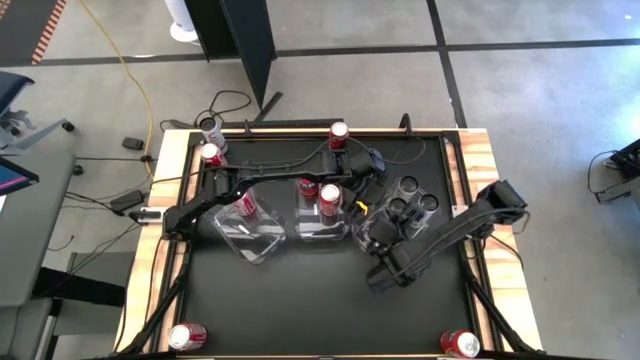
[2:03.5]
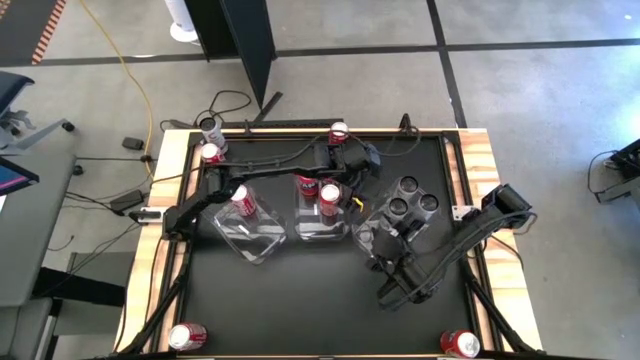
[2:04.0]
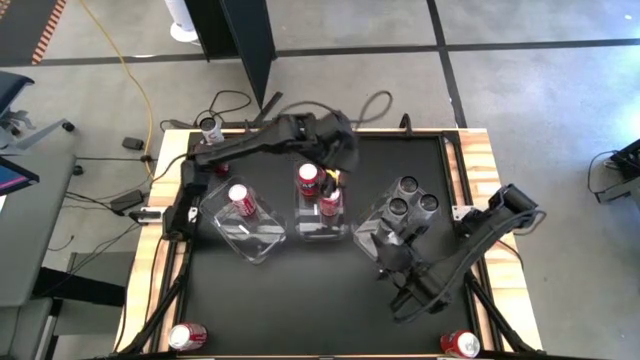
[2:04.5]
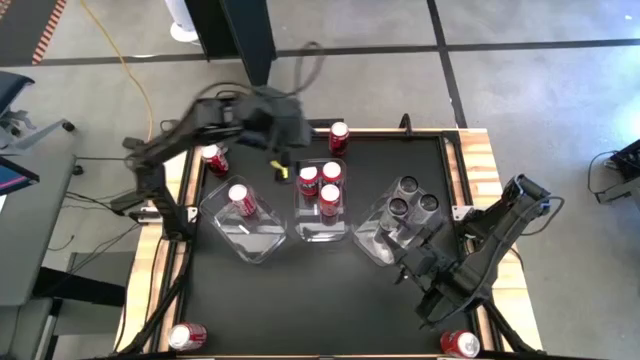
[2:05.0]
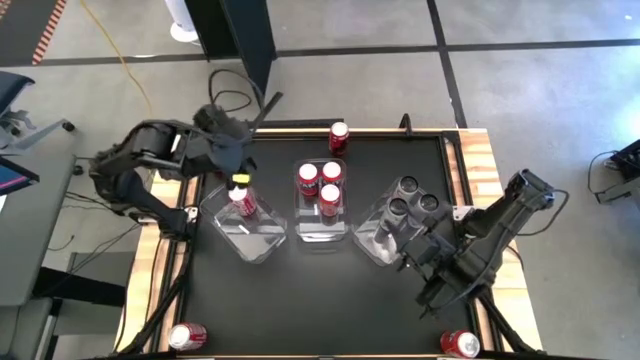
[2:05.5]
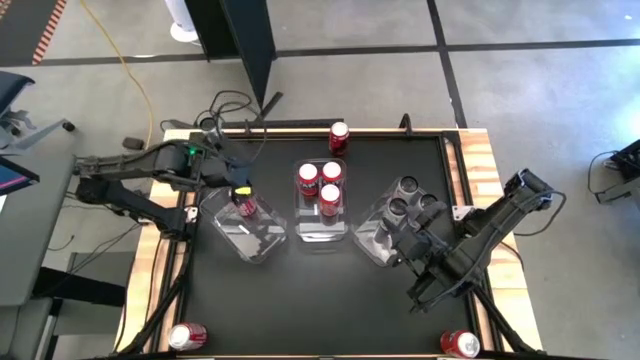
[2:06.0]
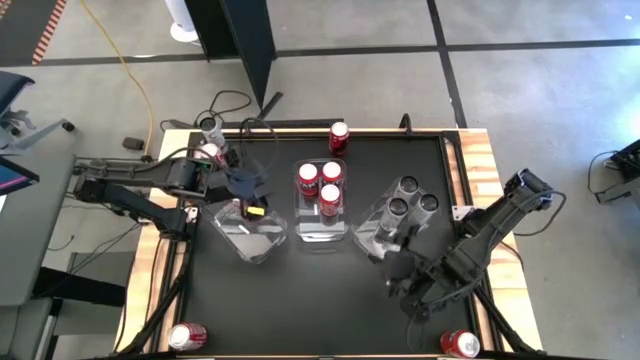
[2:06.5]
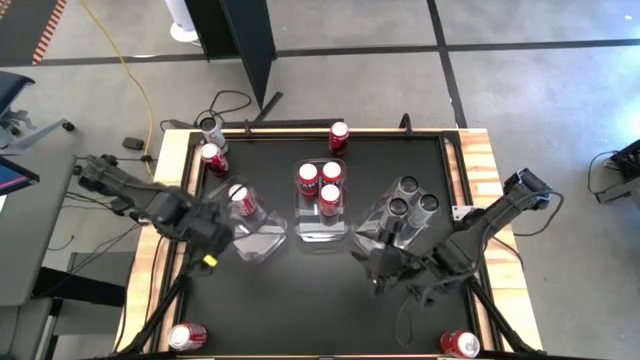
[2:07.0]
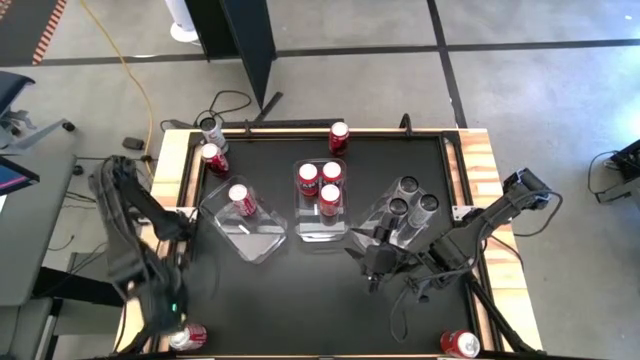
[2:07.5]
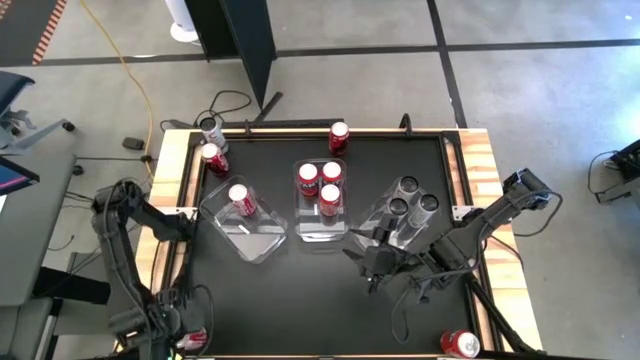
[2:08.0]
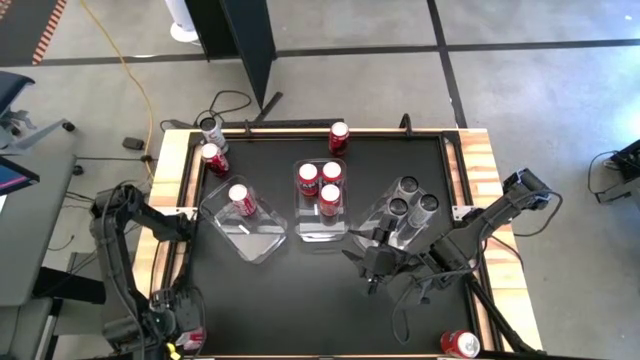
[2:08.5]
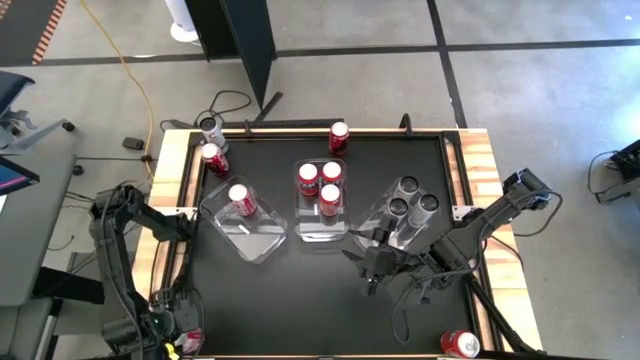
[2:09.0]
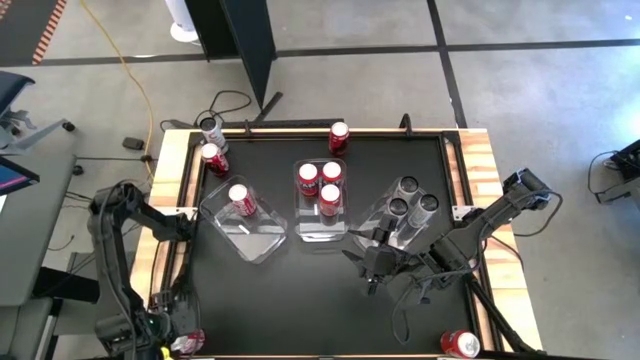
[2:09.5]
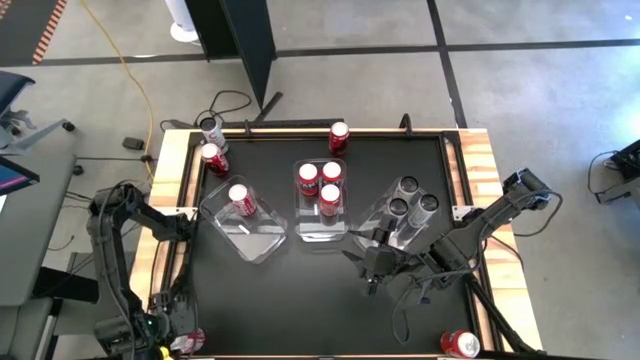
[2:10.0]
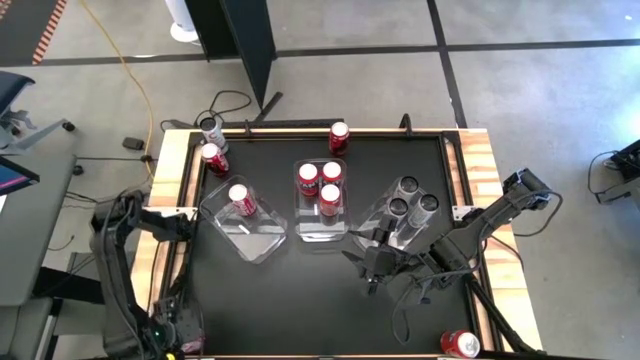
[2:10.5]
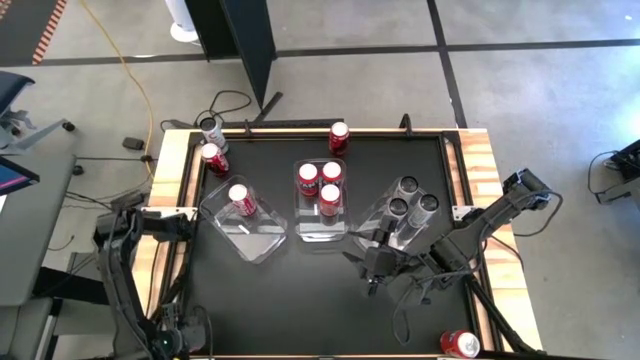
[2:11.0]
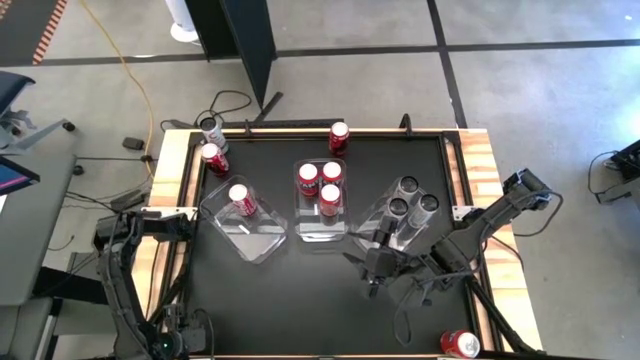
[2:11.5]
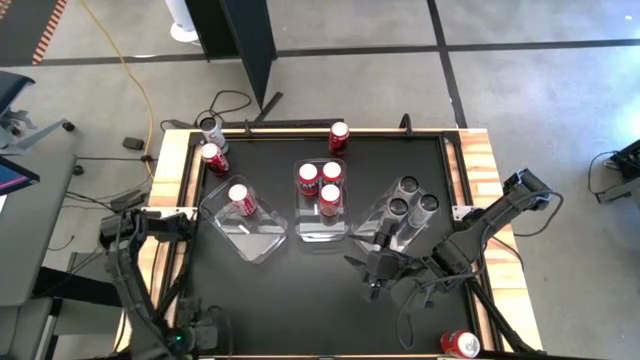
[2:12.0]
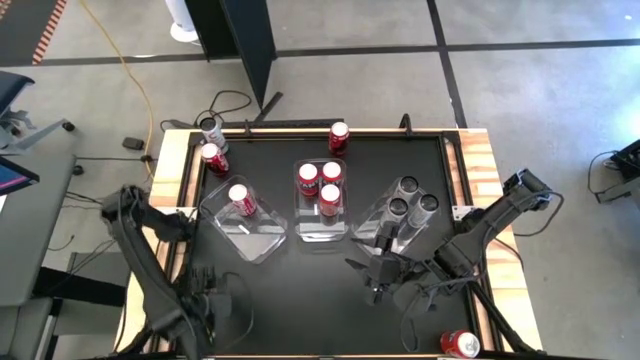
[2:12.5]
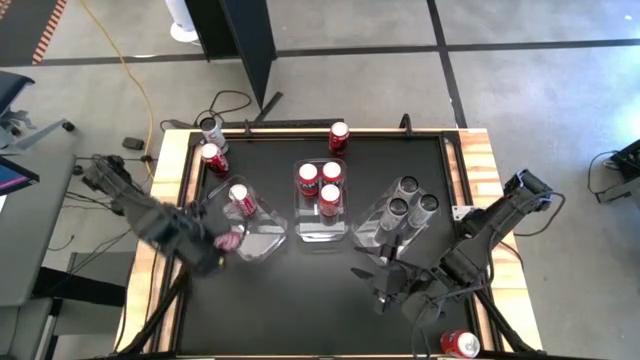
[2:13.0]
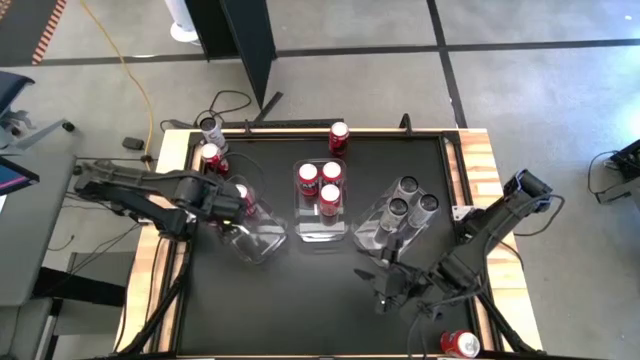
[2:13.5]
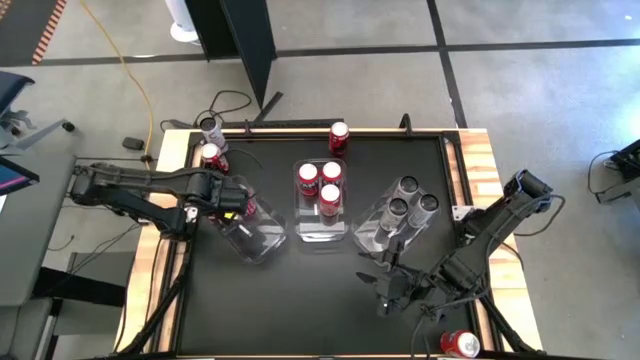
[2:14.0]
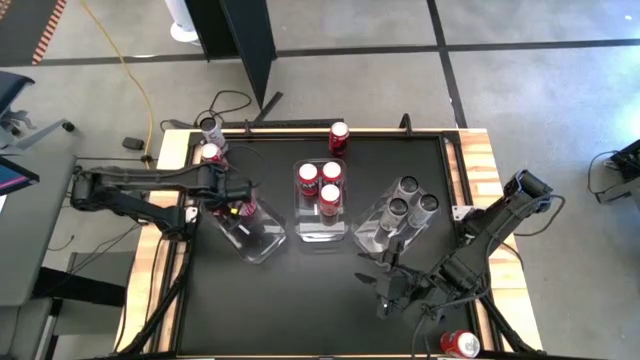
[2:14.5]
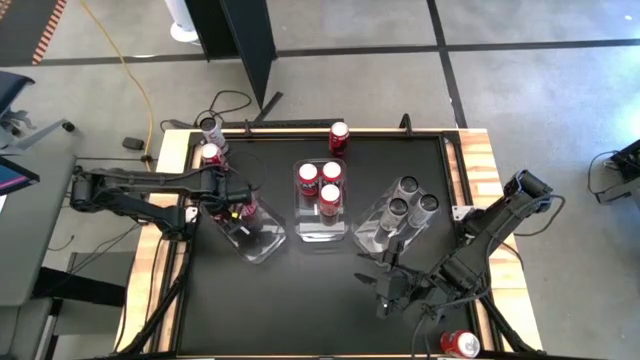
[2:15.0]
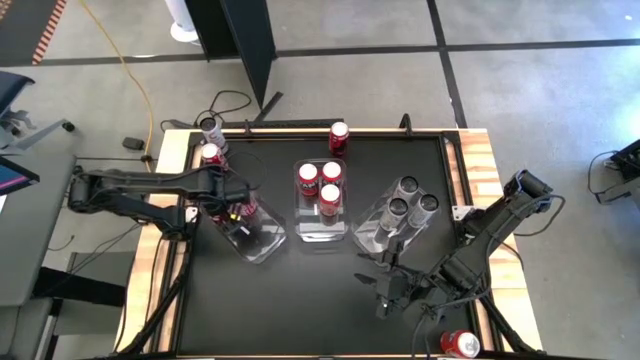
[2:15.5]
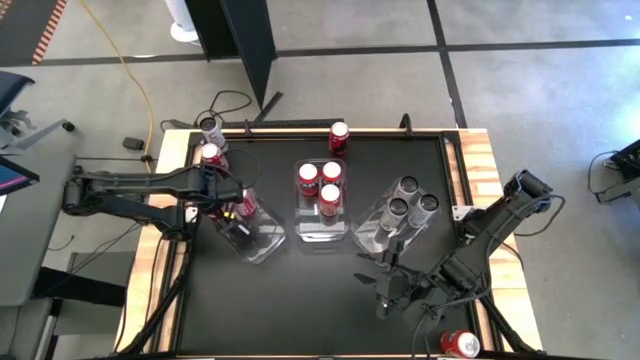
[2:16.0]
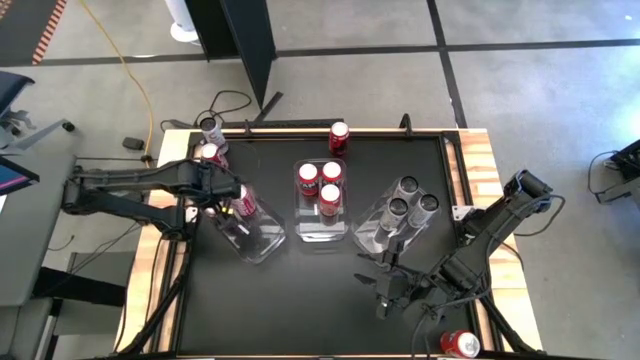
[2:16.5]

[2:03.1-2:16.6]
Task: Sort soda cans
Put the bottom left red soda can into the left transparent bin

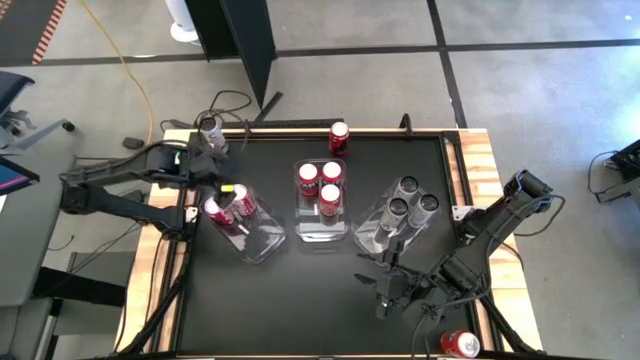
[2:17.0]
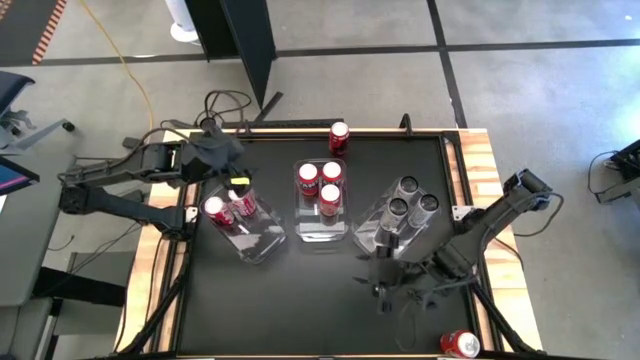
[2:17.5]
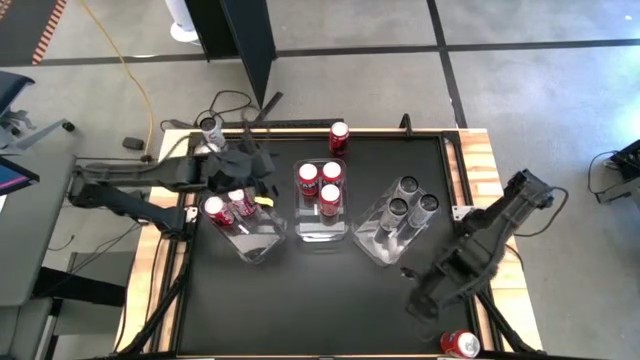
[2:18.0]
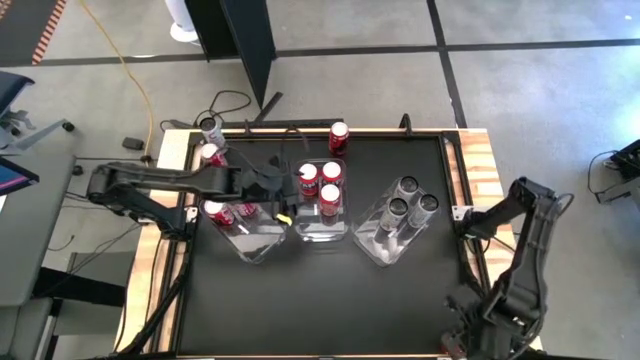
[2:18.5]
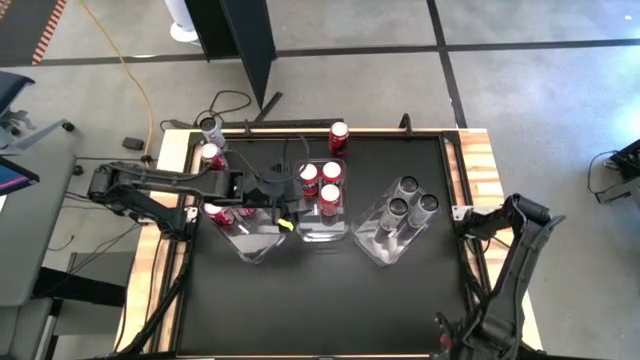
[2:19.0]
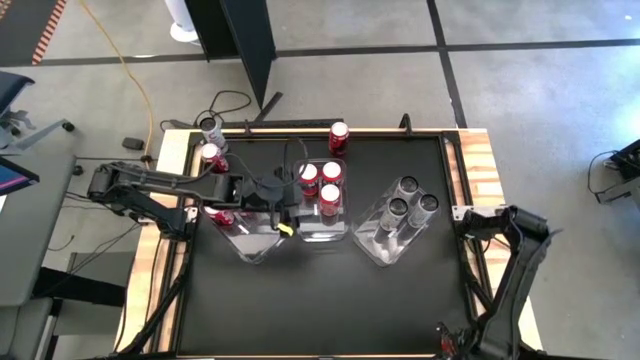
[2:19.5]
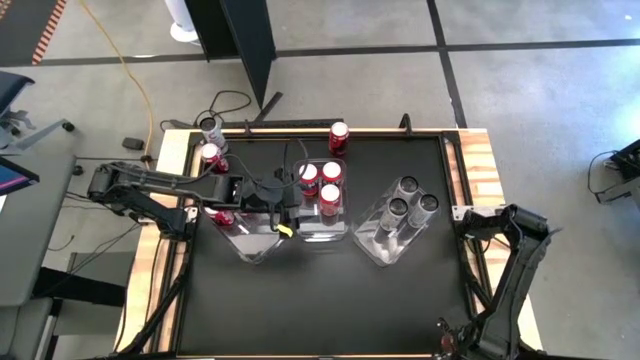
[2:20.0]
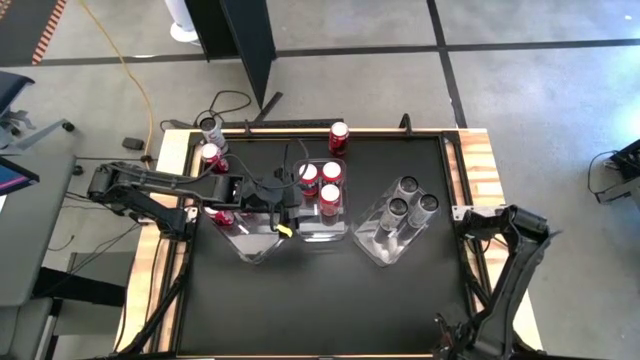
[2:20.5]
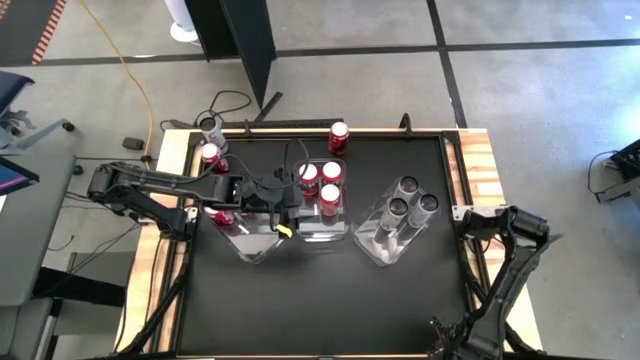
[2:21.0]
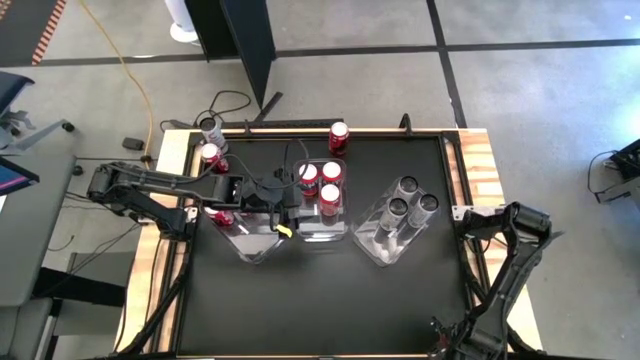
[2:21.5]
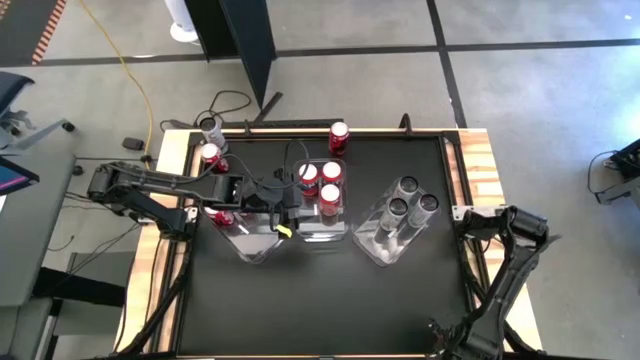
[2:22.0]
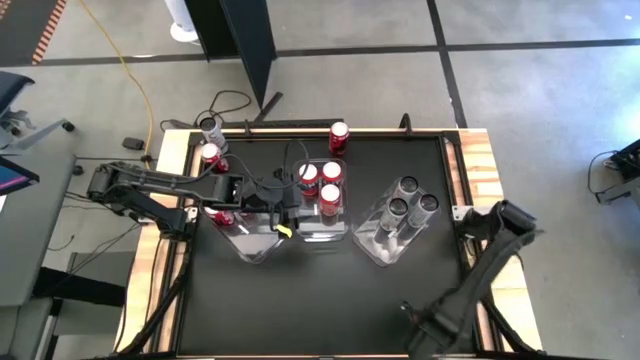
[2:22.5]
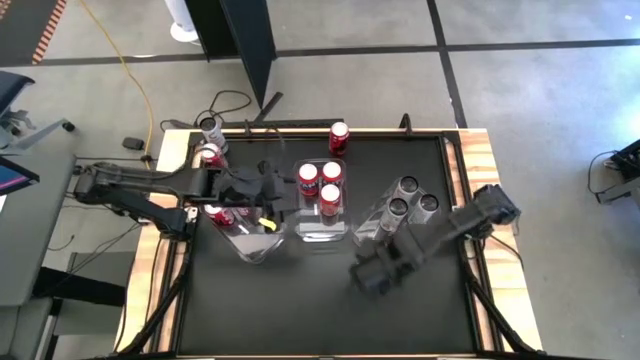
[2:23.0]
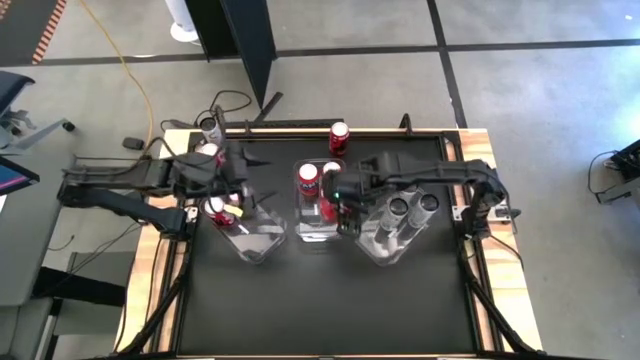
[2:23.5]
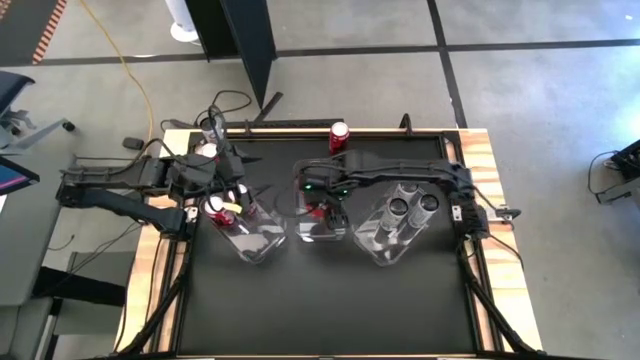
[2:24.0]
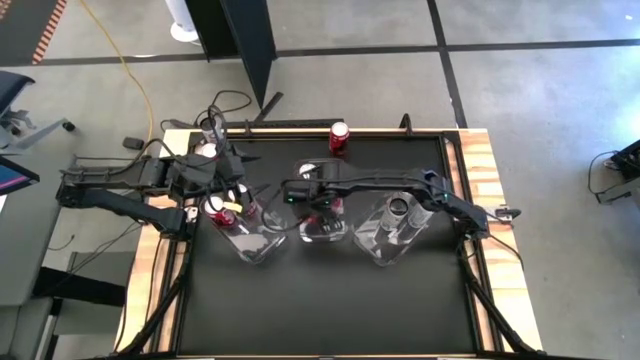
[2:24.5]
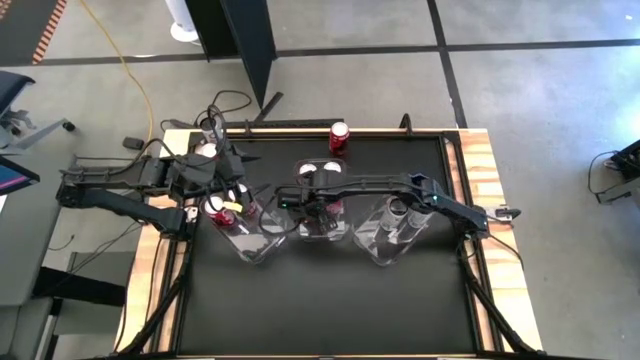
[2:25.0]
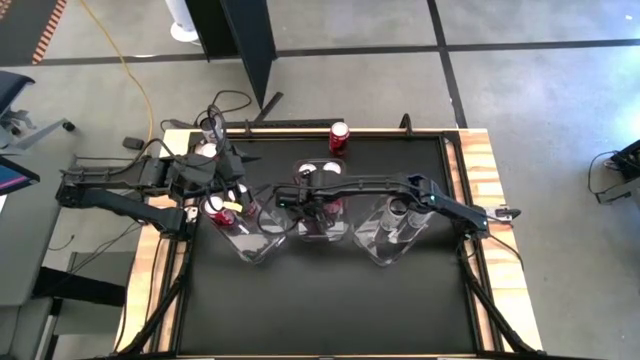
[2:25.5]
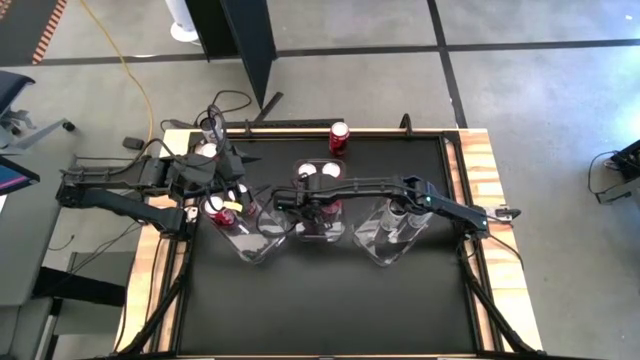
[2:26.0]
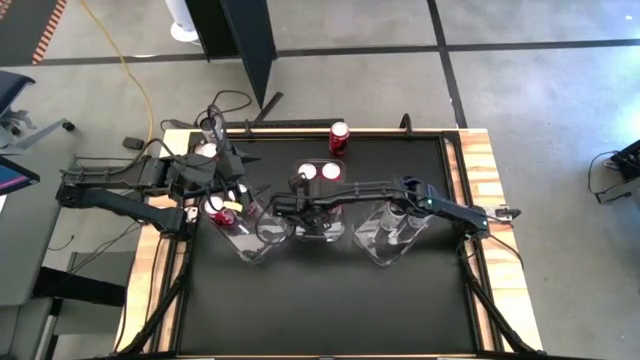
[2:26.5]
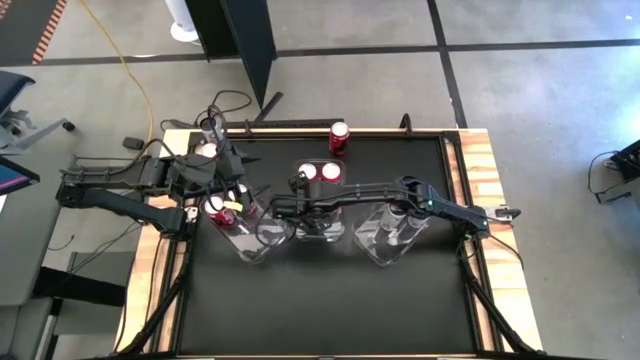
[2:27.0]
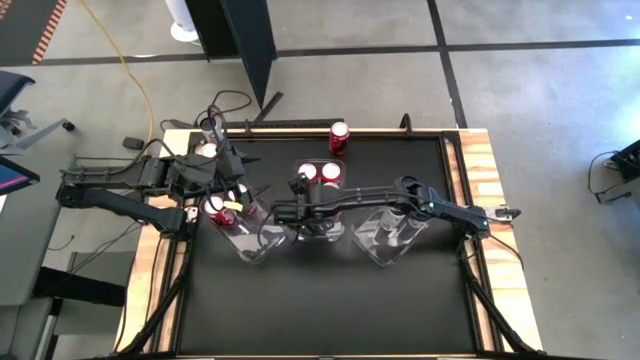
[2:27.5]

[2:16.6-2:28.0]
Put the orange soda can into the center transparent bin
